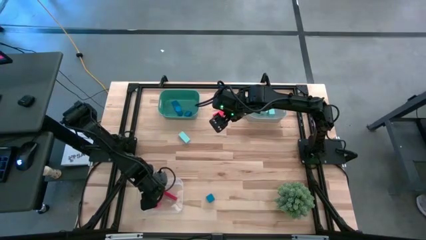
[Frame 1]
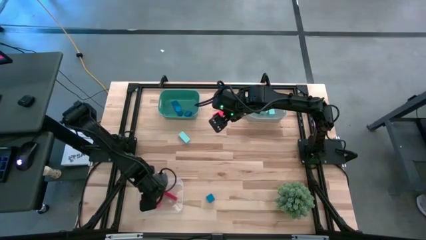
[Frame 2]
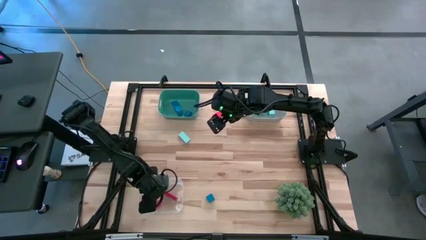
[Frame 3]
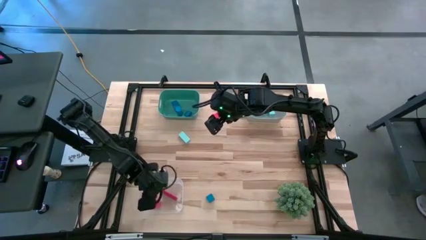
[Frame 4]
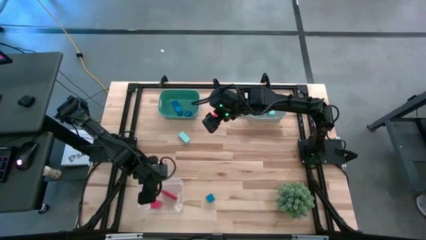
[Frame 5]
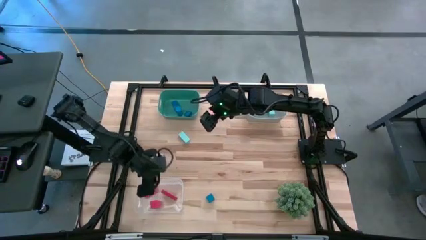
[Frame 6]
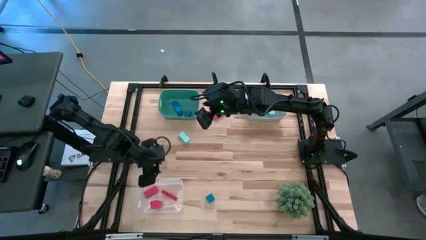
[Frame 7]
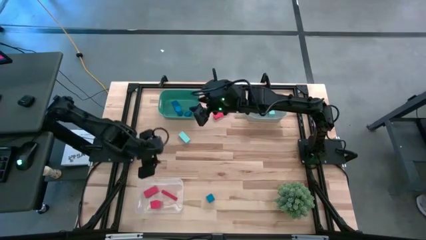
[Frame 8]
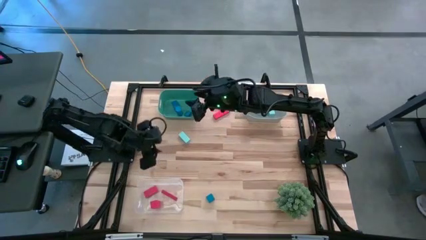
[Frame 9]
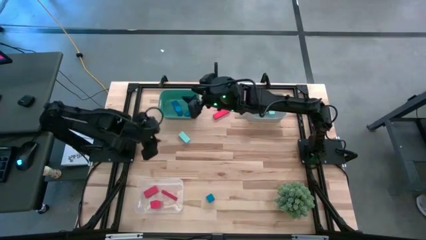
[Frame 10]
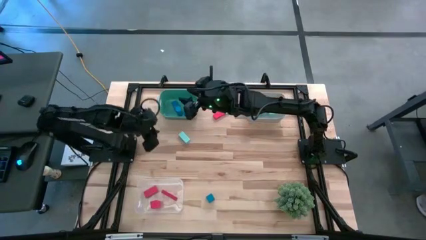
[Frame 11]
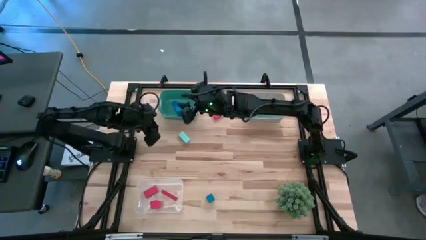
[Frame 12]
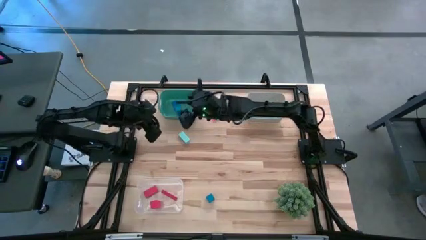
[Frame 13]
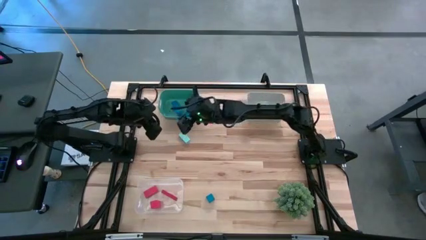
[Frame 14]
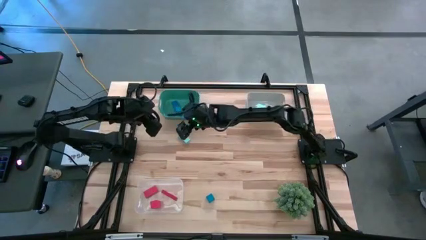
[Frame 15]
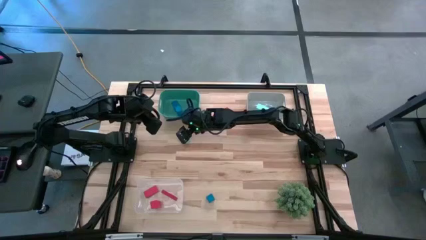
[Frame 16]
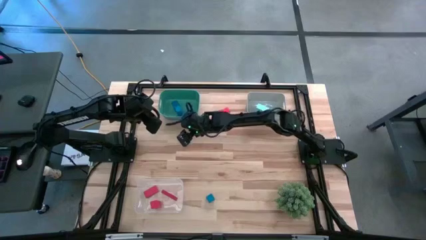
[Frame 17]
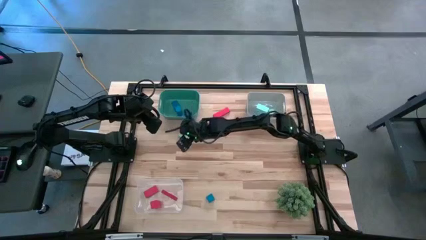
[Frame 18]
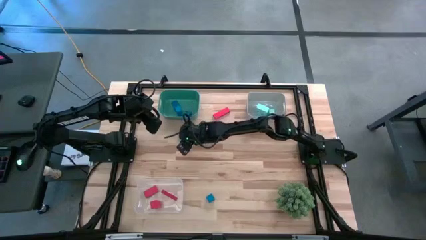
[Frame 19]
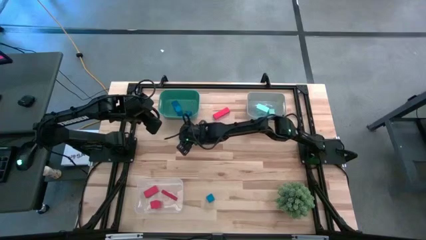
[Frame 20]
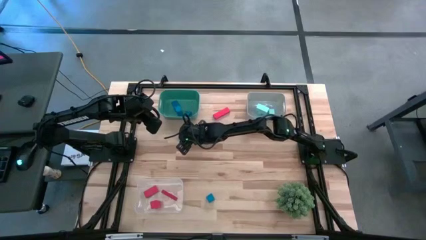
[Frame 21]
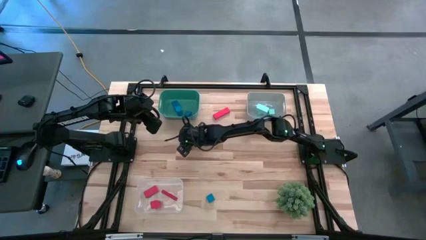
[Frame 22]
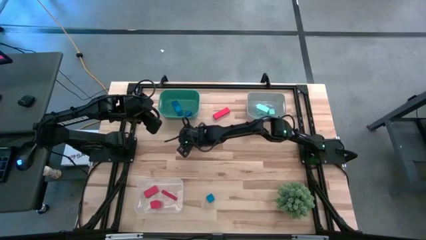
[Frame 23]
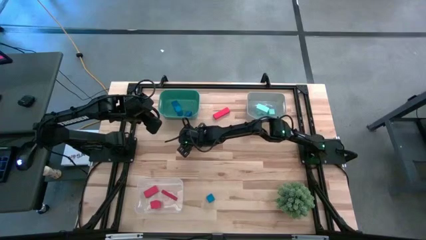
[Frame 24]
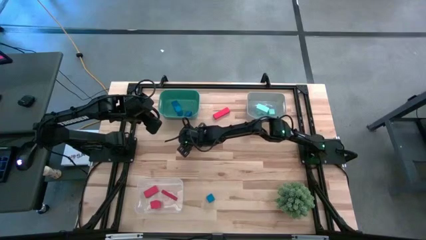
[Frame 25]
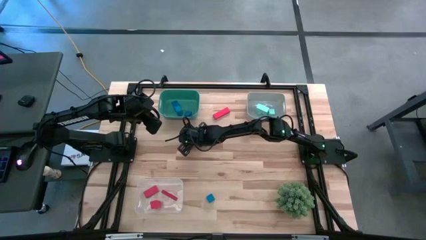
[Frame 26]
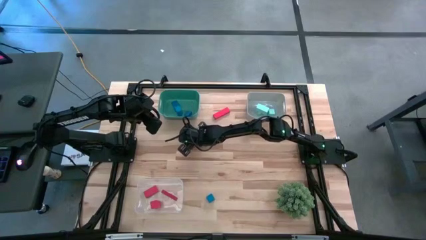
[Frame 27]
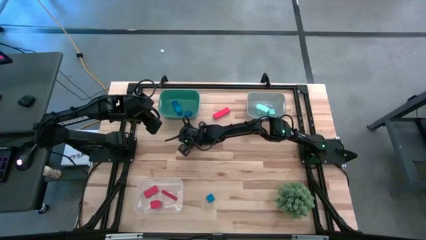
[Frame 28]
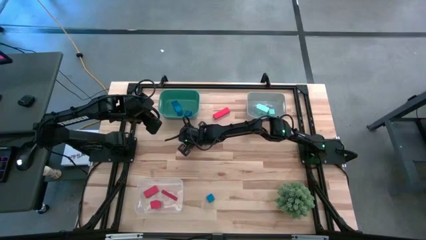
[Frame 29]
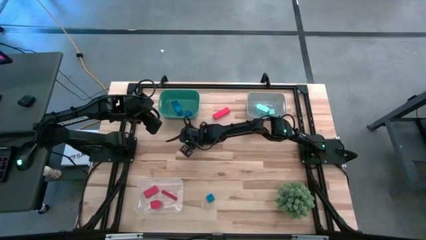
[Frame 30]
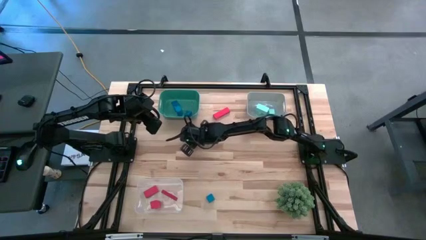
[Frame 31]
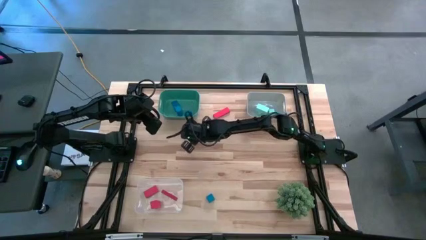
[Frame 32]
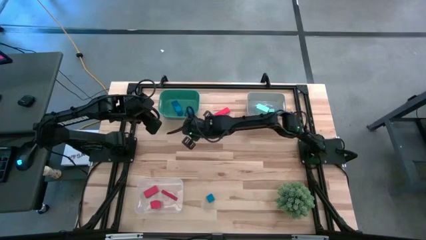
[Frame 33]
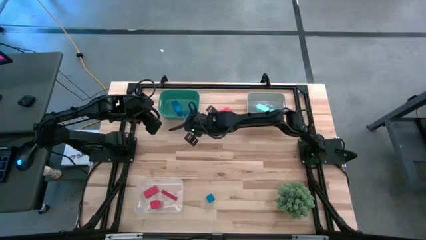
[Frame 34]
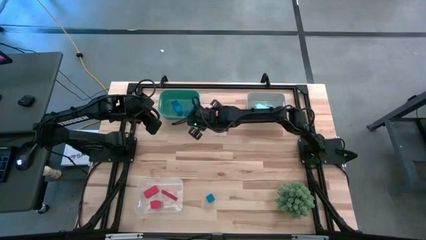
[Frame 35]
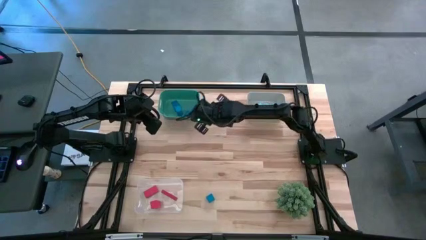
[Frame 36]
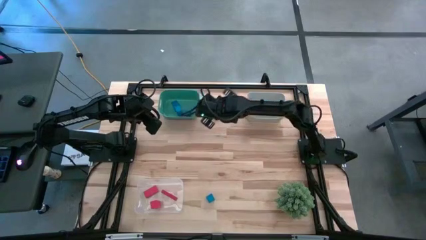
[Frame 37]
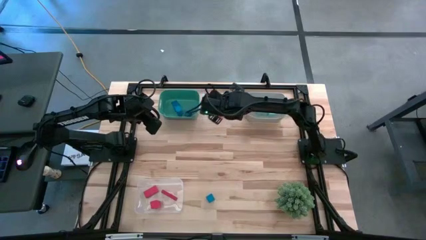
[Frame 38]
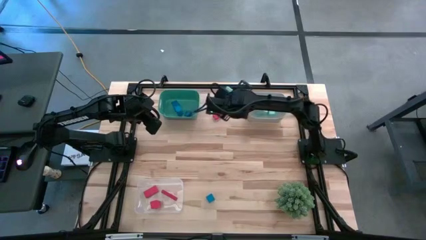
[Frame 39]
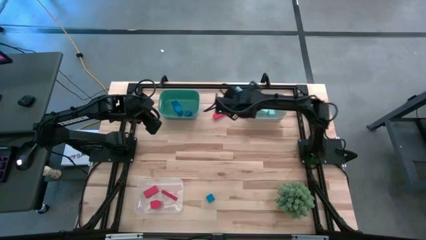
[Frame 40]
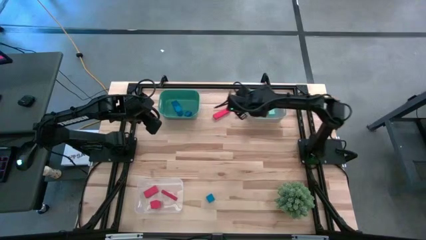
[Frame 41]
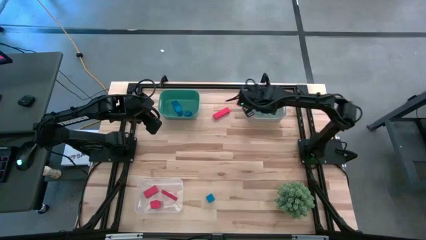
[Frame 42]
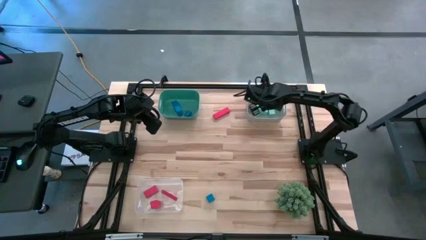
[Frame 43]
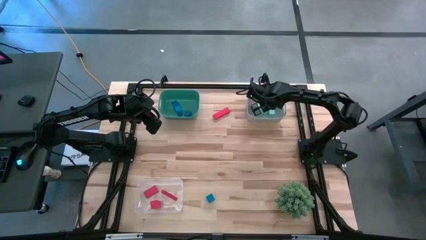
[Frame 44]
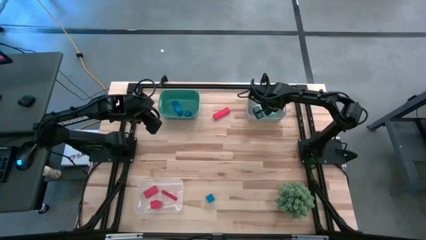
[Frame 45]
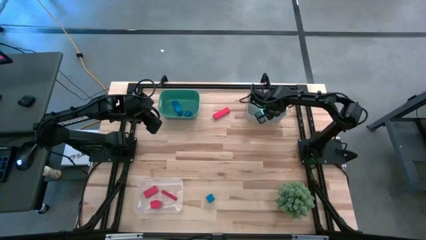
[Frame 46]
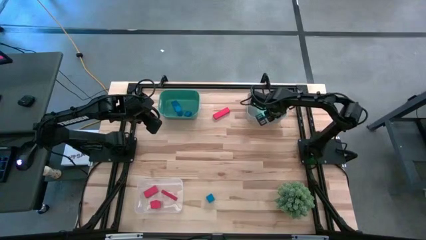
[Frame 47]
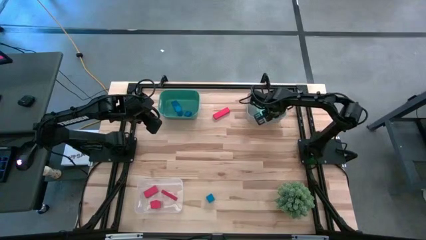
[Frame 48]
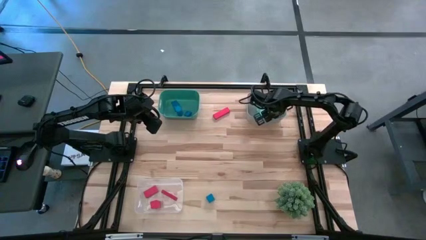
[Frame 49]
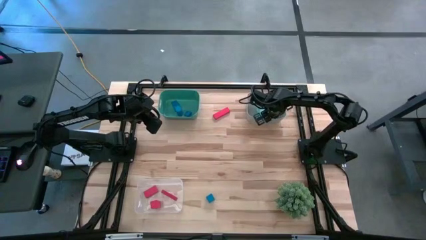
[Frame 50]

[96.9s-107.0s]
Task: Sort & place blocks by color
Put the light blue block into the grey bin
